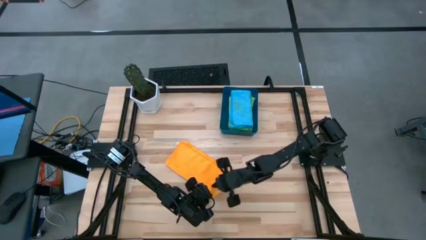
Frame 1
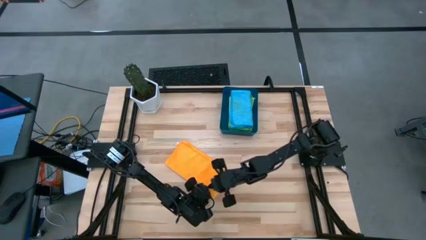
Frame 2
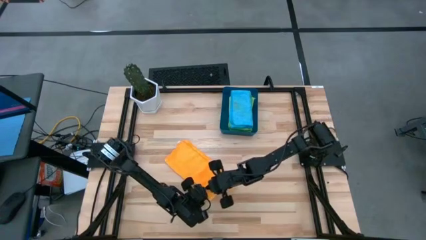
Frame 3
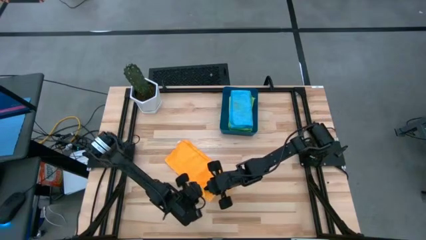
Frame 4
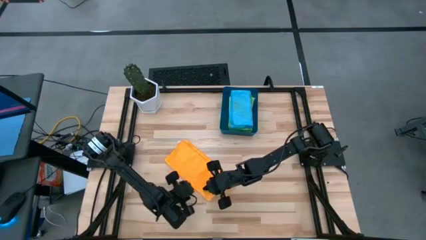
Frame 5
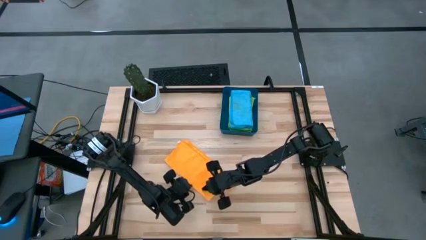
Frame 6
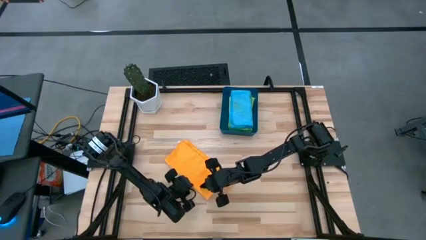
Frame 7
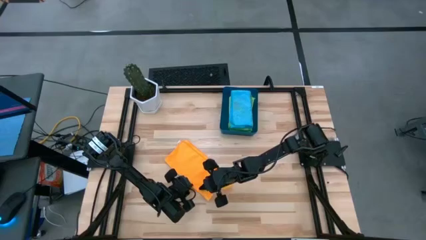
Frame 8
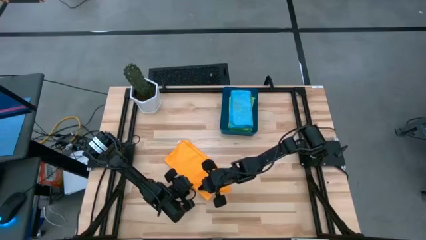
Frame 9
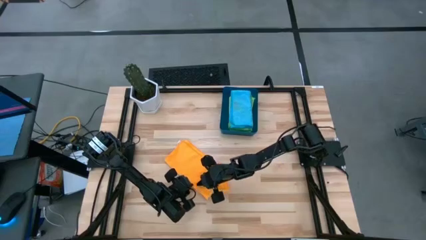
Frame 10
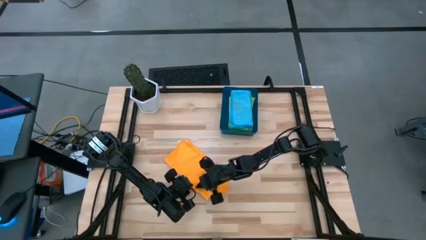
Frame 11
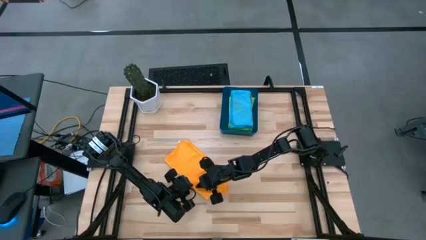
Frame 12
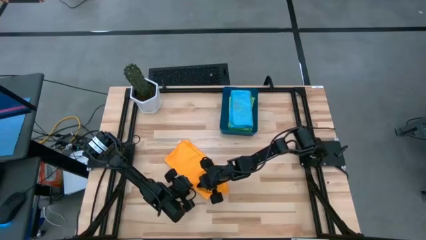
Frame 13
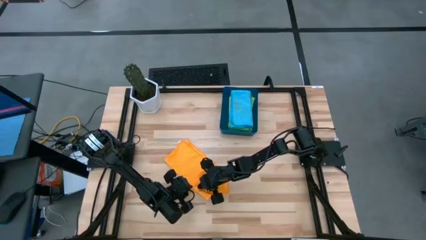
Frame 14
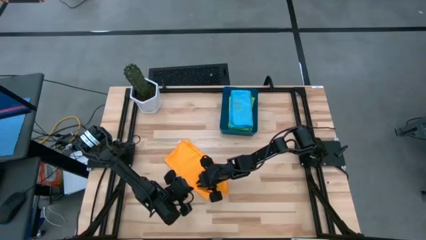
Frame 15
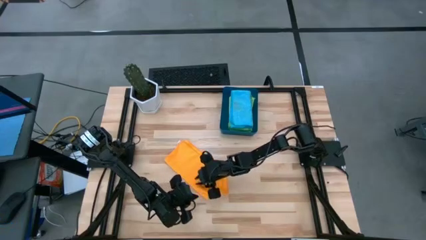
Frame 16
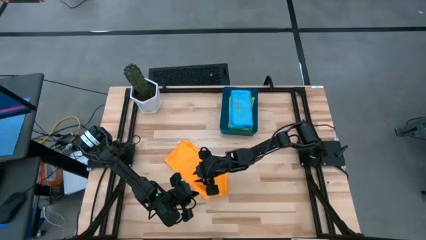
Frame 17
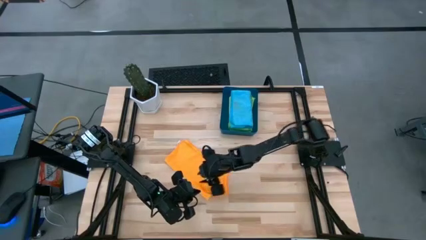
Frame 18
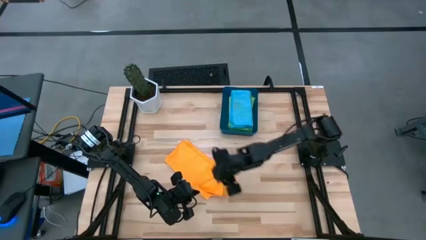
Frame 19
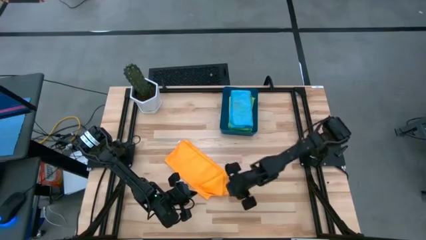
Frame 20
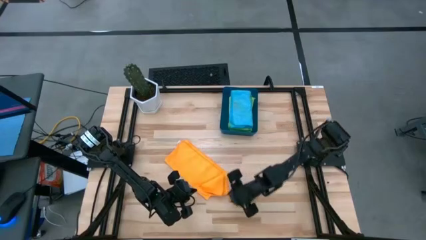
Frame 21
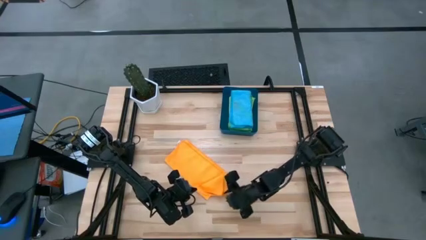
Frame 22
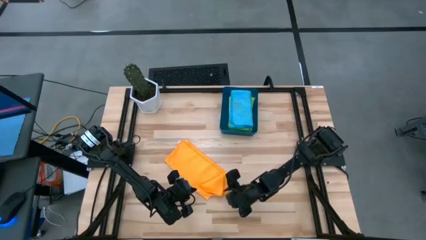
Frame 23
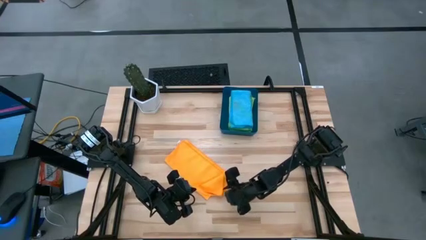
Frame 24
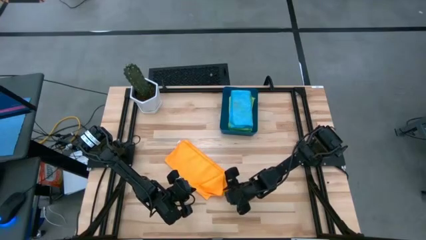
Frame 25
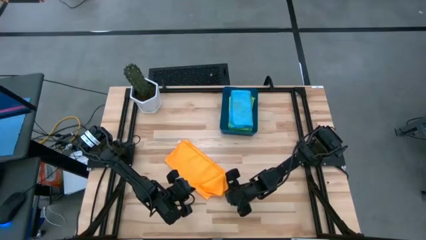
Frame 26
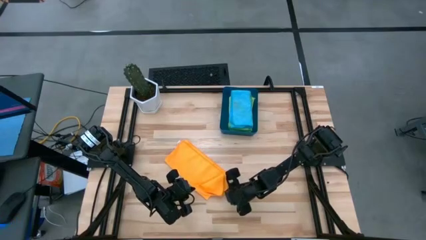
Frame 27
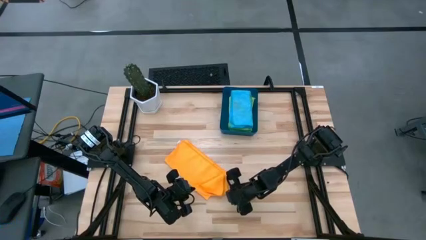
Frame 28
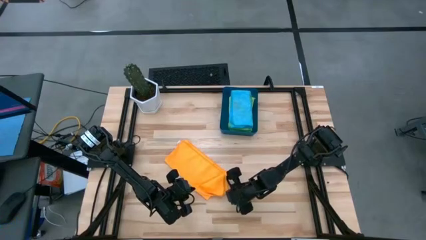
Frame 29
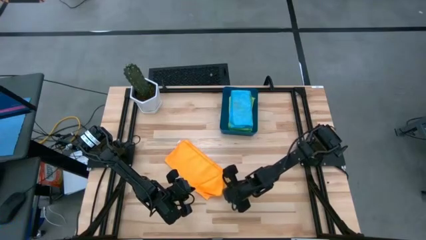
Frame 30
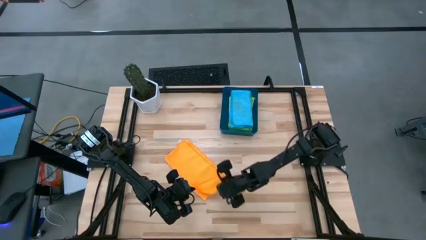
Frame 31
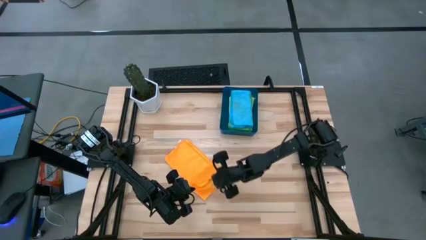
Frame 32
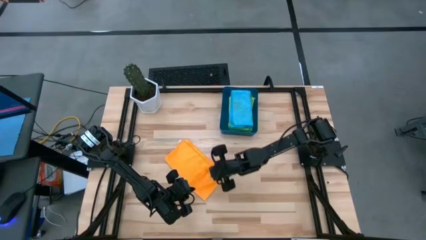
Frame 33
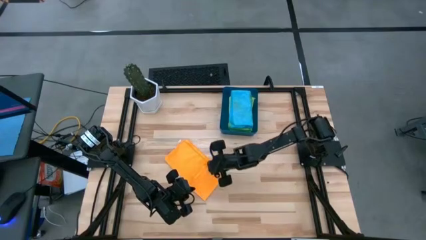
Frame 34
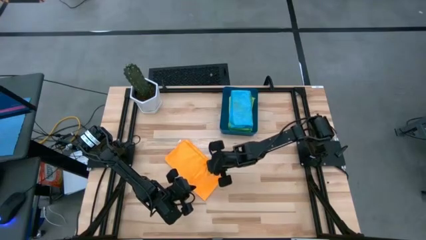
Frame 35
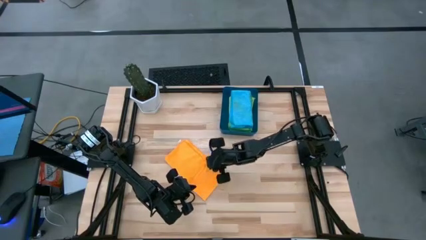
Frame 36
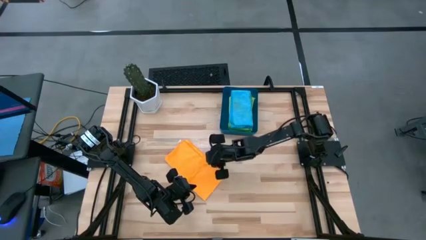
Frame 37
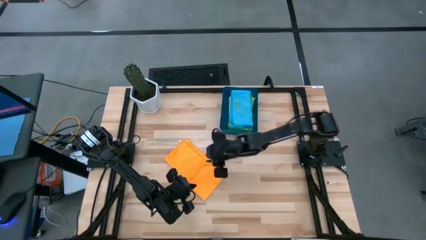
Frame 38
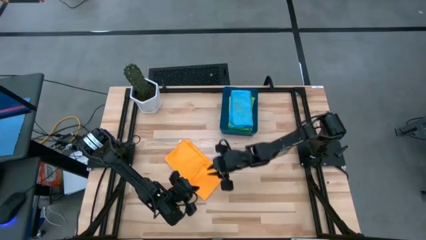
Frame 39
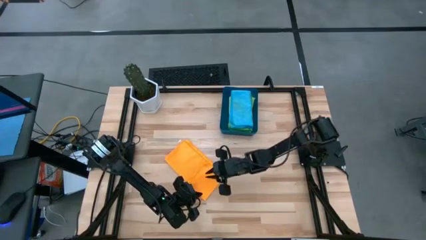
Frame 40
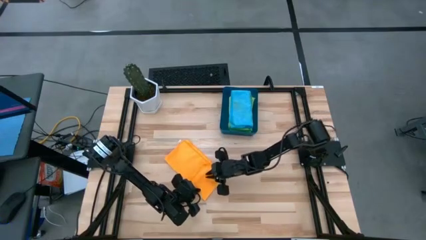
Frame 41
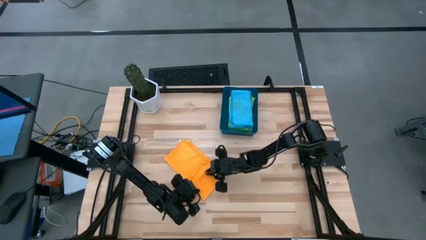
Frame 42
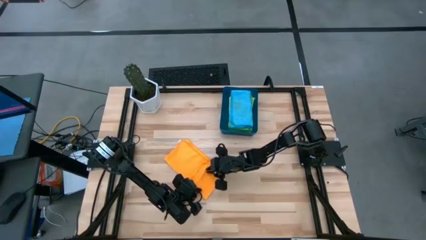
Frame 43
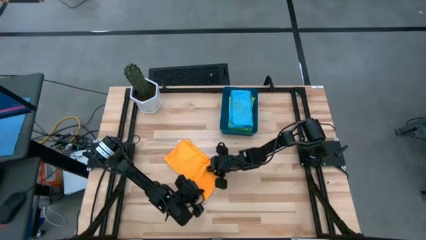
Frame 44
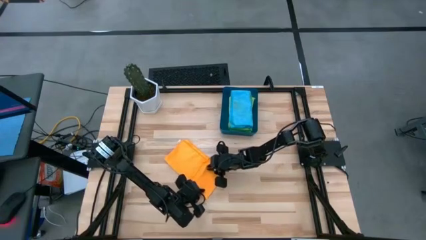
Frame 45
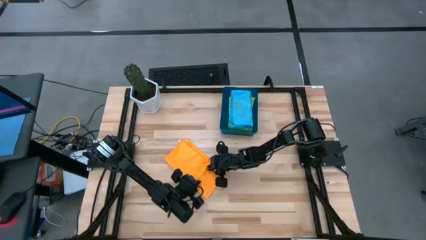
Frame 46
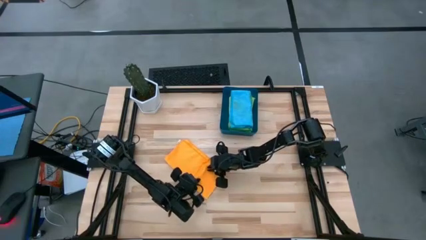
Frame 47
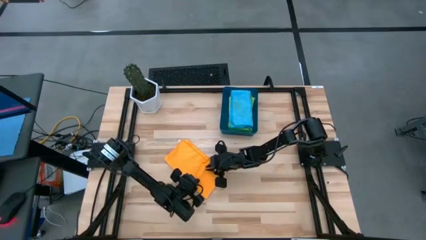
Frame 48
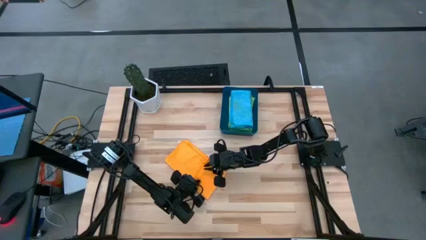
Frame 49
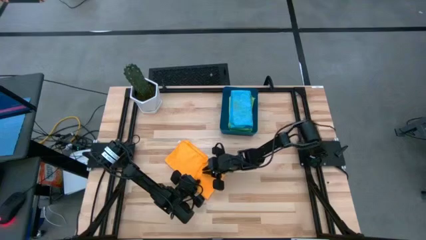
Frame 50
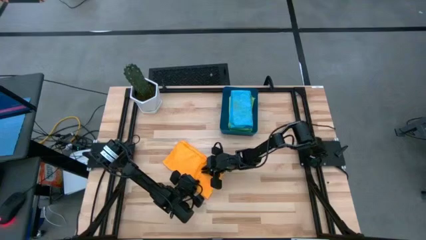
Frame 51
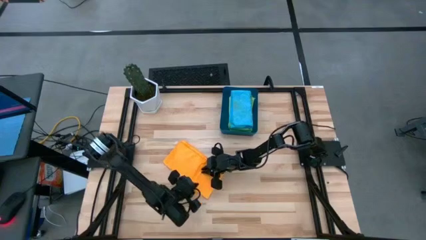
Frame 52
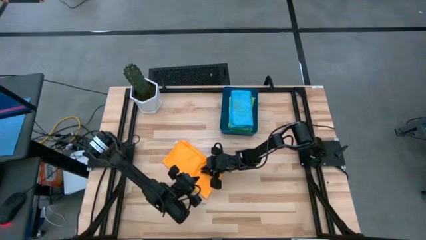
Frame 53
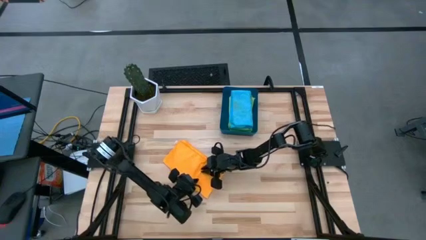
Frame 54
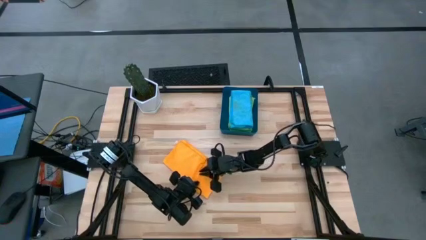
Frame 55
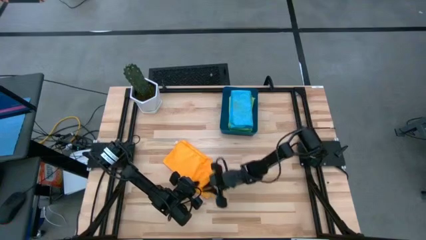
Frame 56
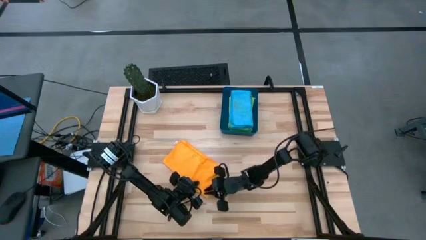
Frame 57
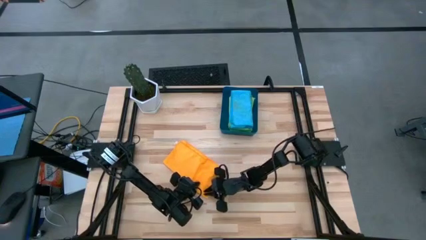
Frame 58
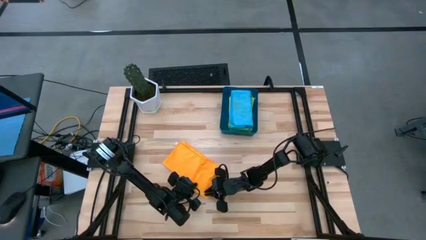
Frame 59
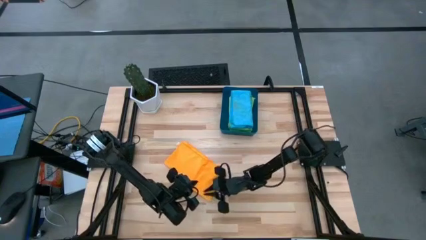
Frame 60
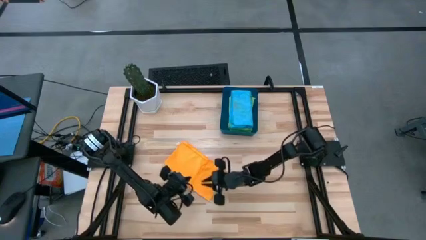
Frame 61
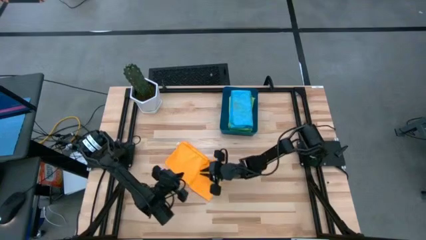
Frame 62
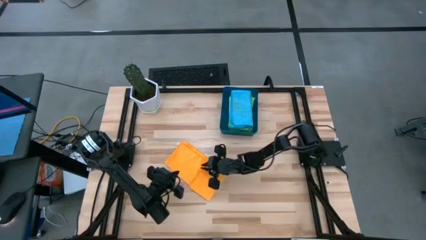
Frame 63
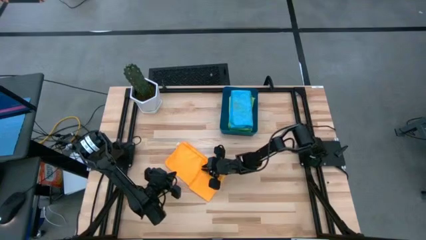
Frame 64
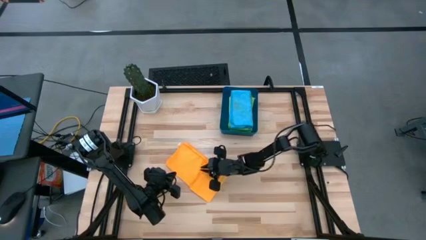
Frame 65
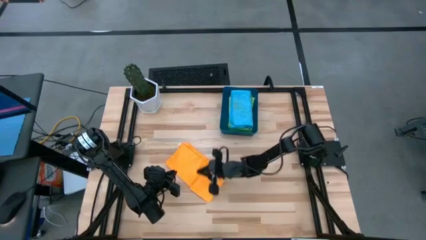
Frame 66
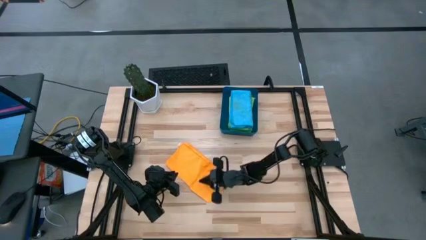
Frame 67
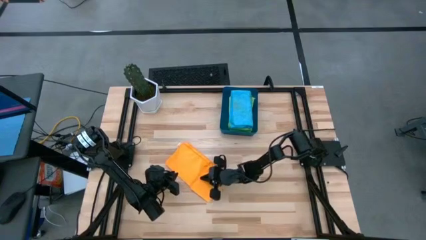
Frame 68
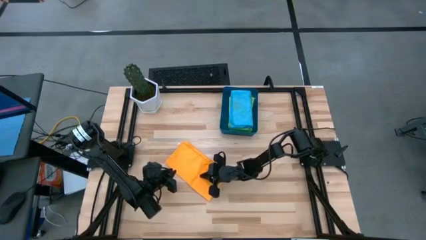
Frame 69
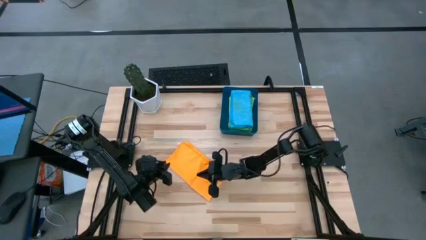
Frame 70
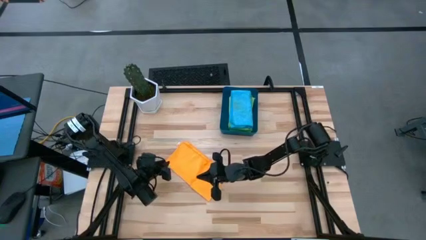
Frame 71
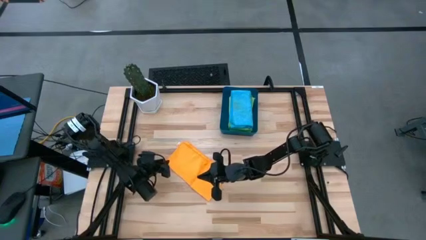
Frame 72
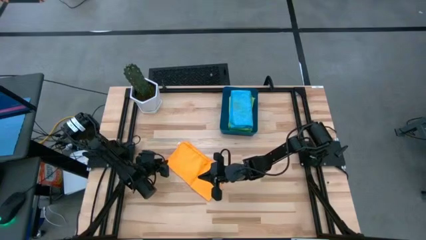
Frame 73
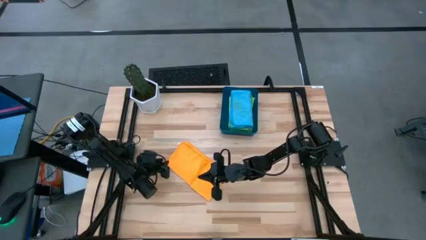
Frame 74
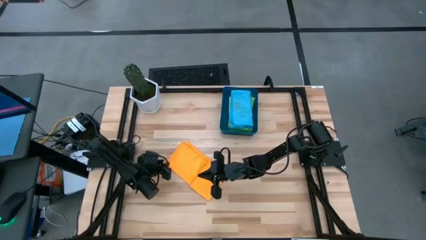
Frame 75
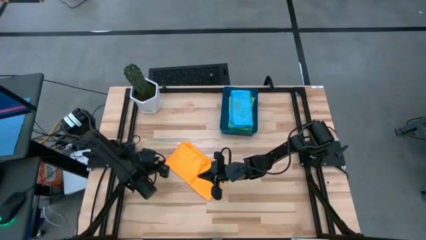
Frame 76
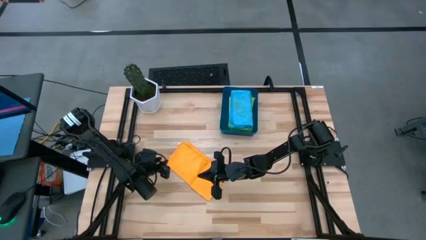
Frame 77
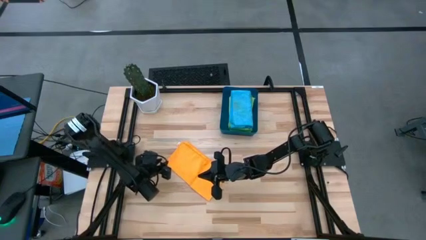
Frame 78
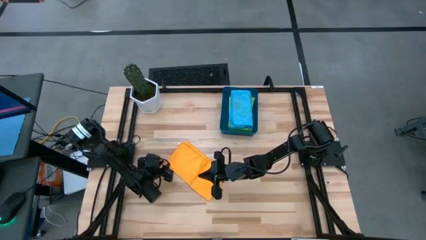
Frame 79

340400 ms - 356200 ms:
Task: Fold microfiber towels
Fold the orange towel
